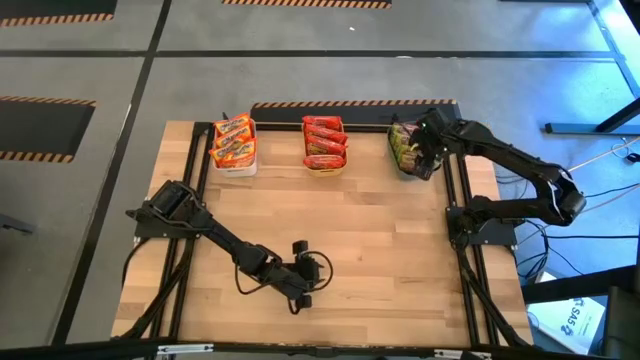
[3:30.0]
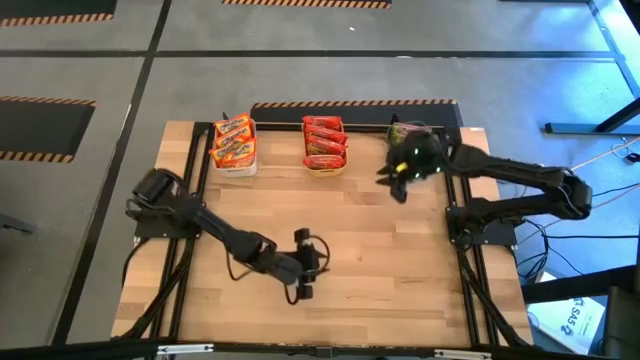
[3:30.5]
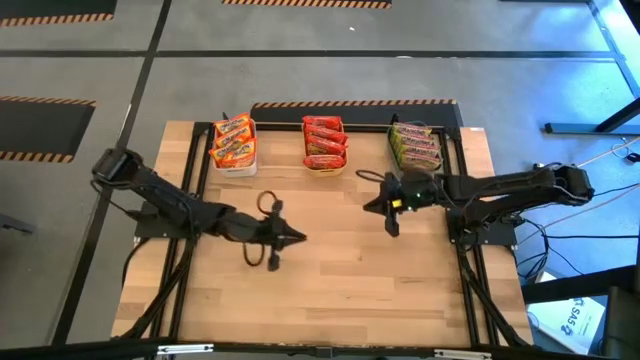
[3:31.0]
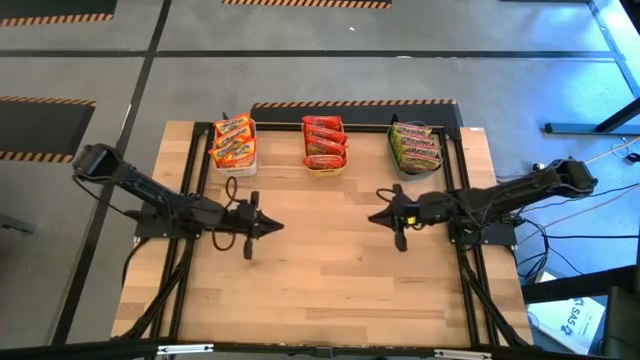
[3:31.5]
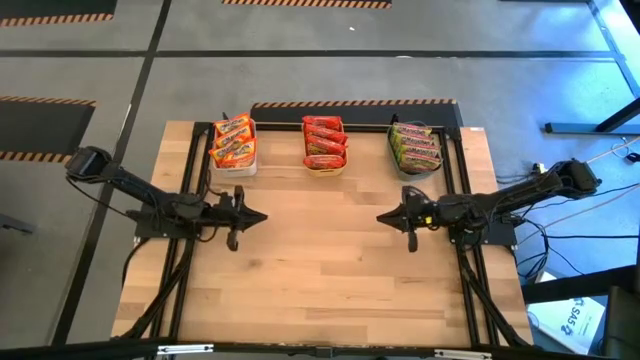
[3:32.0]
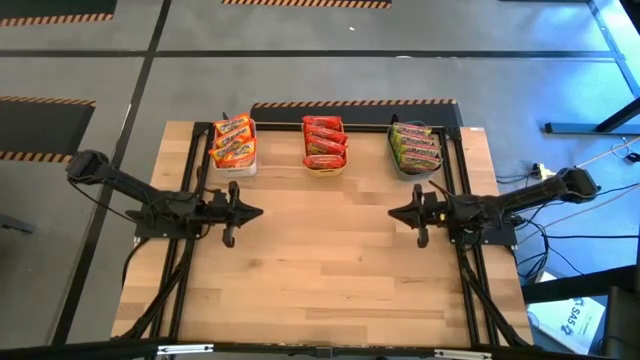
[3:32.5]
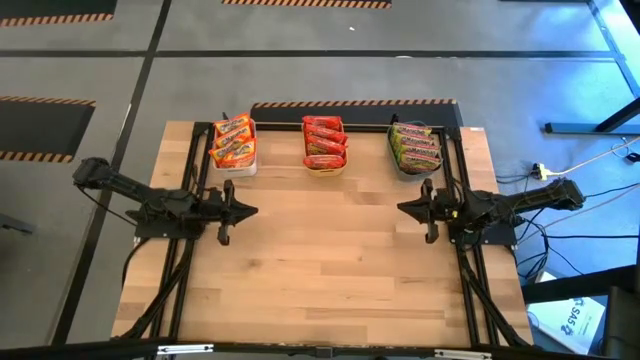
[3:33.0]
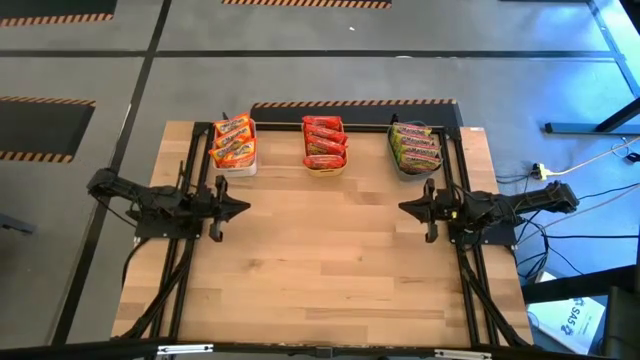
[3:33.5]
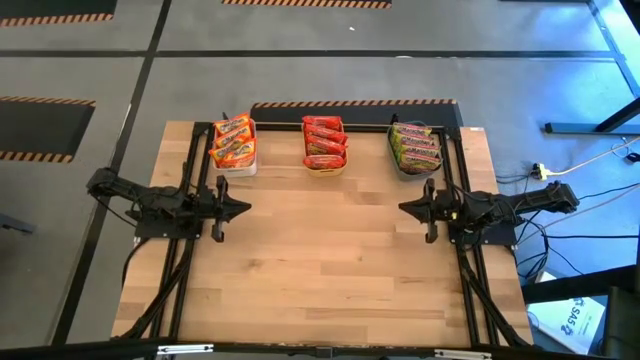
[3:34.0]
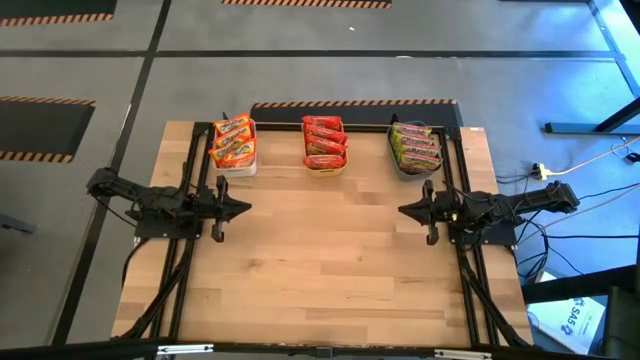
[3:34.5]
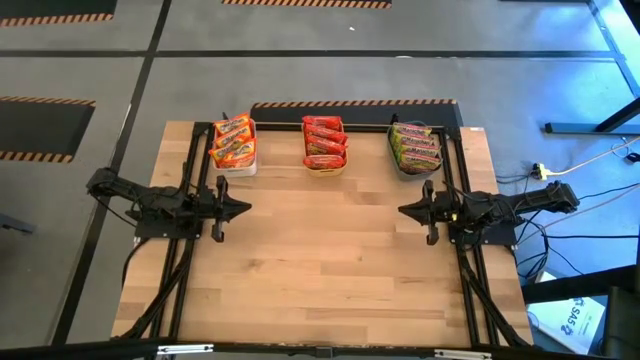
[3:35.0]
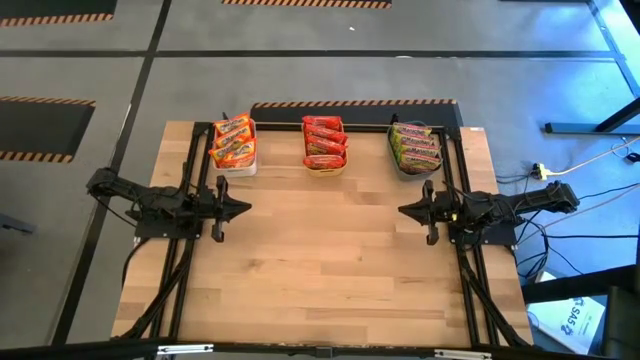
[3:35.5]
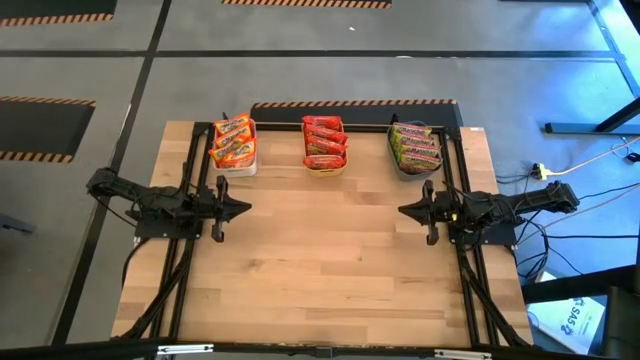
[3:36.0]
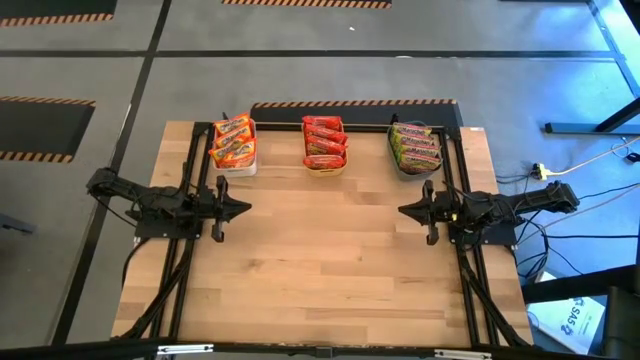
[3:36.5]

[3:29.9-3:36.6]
Task: Sort Maruchan noodles
Return to Home Position

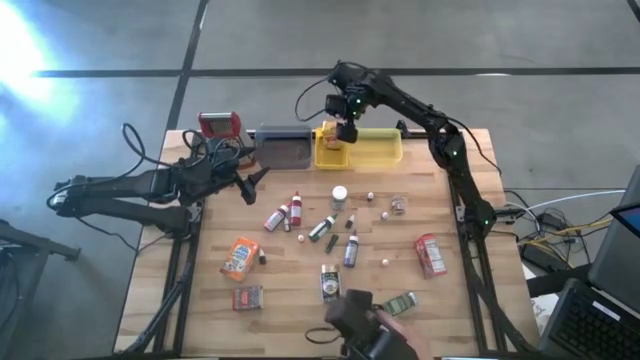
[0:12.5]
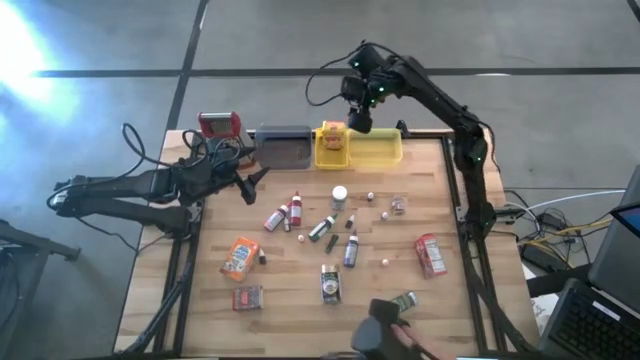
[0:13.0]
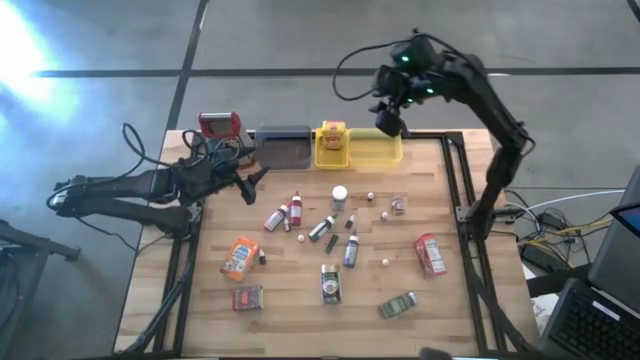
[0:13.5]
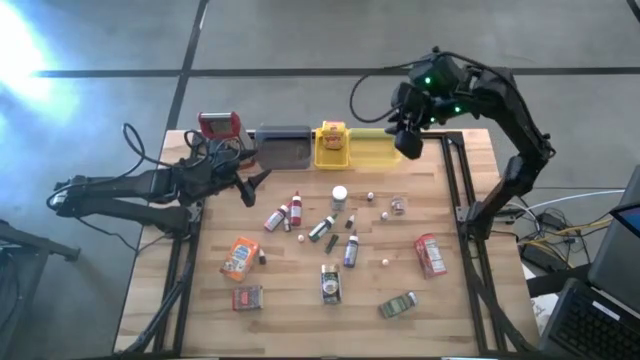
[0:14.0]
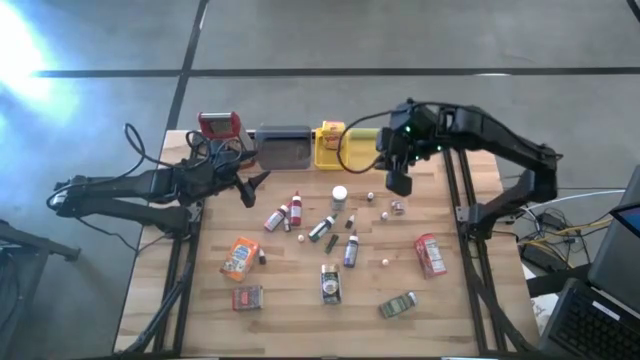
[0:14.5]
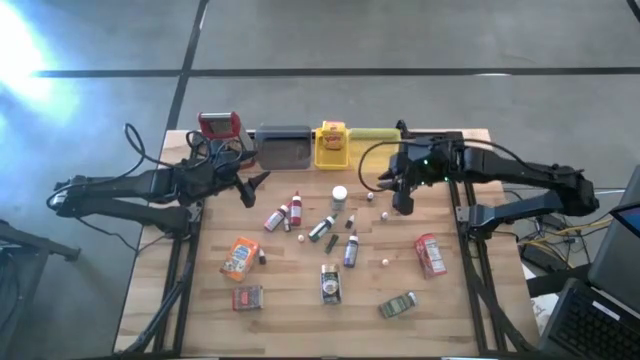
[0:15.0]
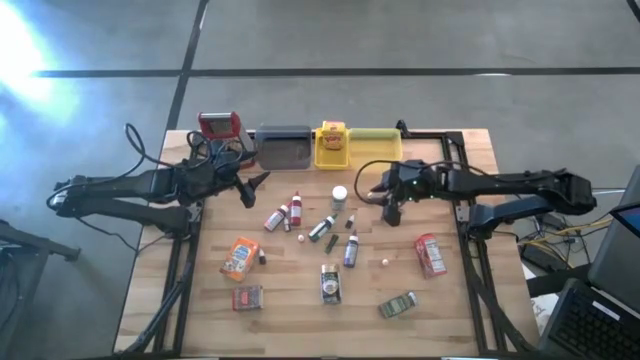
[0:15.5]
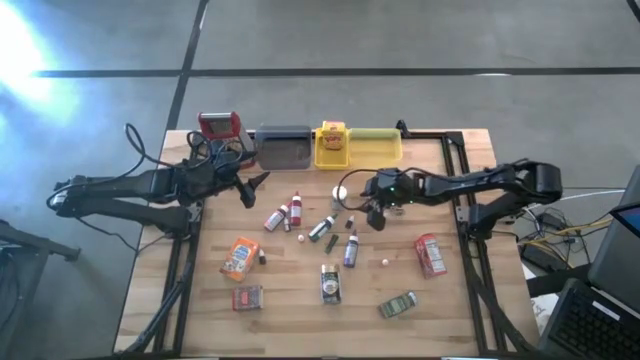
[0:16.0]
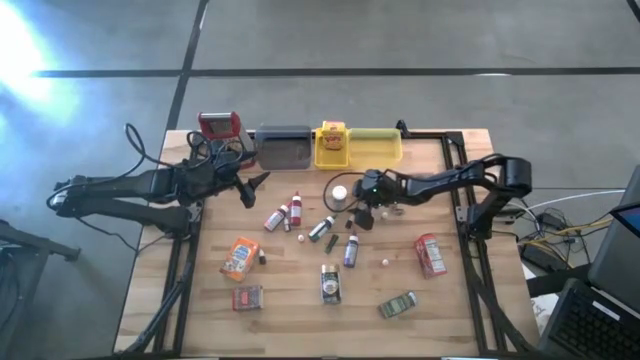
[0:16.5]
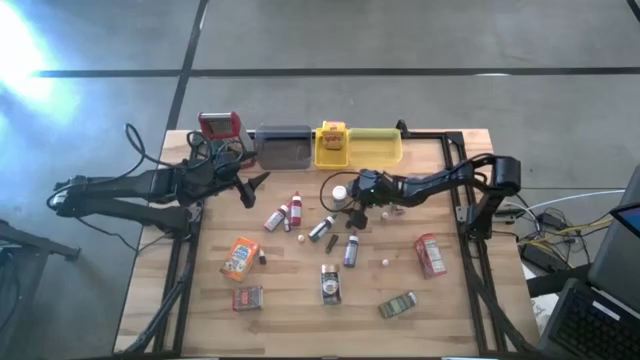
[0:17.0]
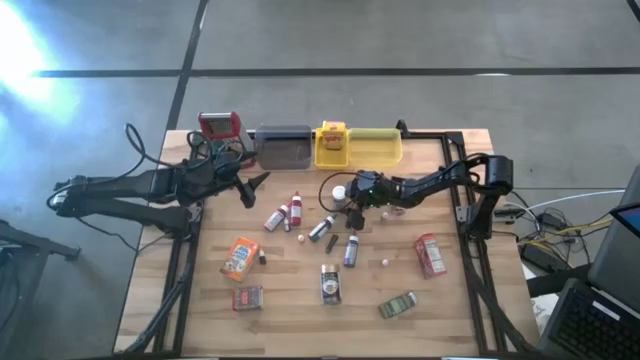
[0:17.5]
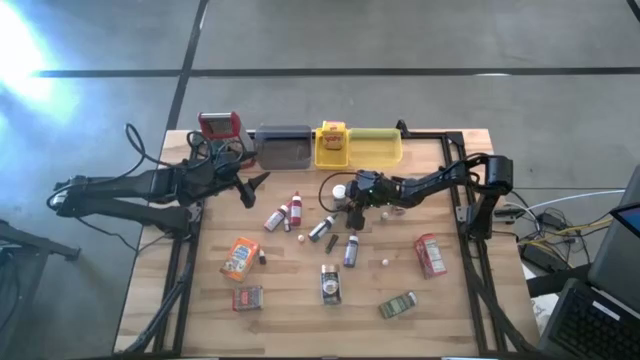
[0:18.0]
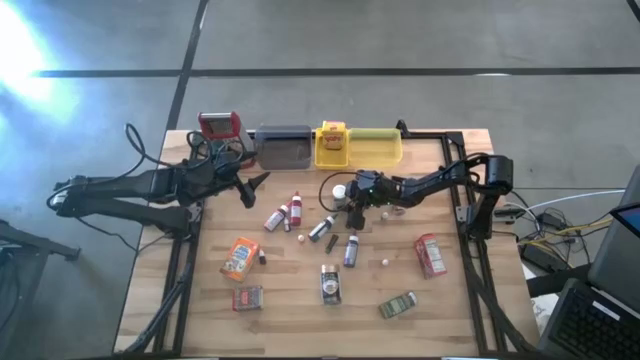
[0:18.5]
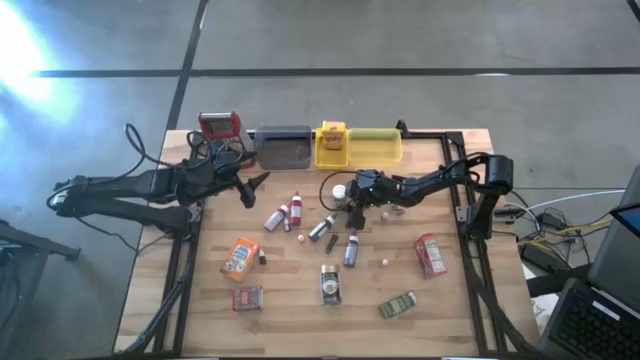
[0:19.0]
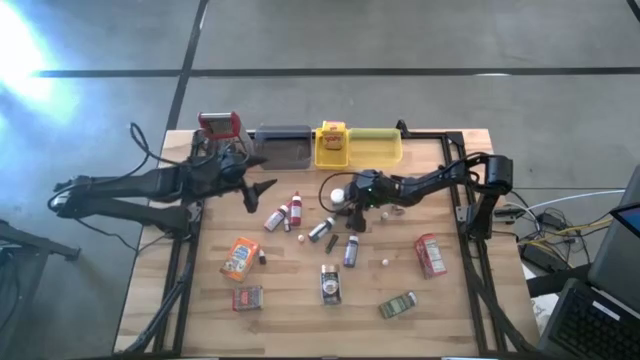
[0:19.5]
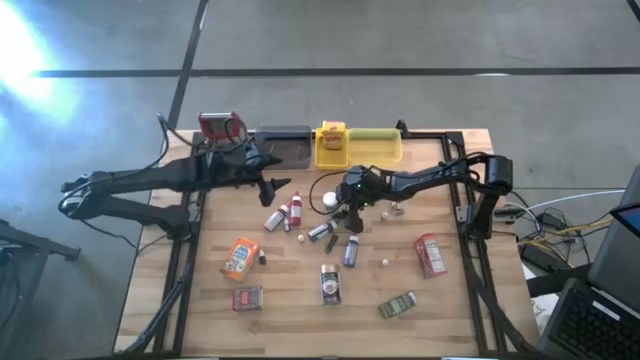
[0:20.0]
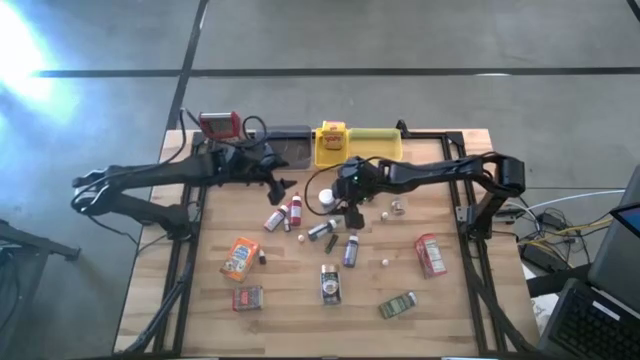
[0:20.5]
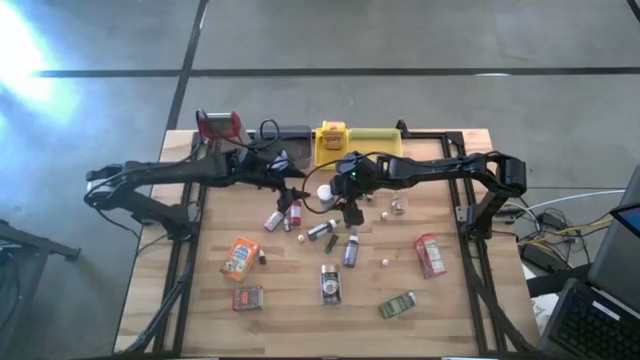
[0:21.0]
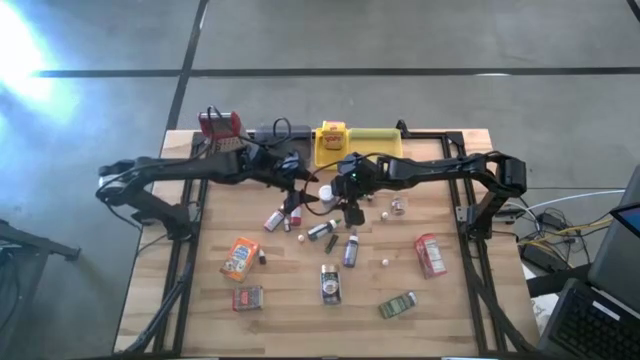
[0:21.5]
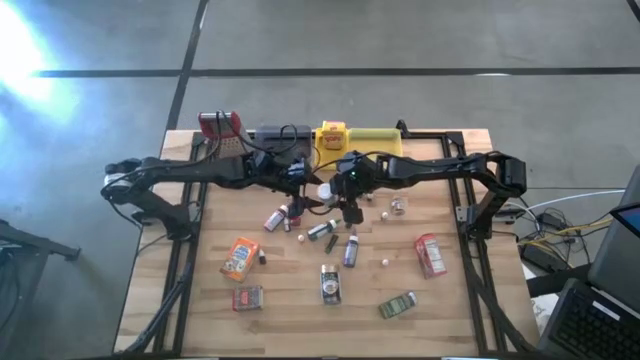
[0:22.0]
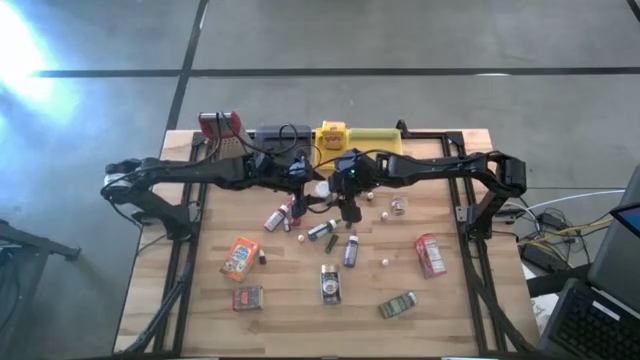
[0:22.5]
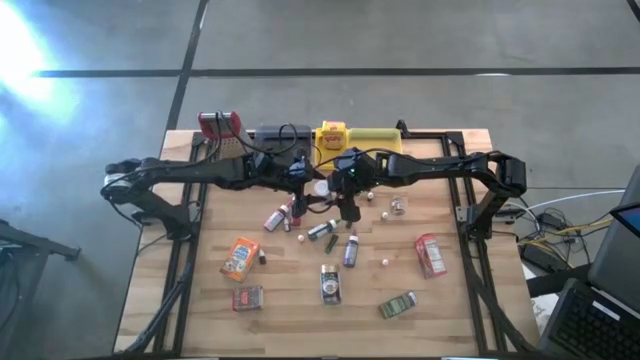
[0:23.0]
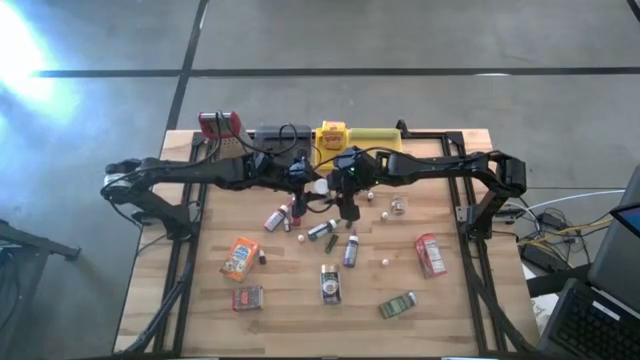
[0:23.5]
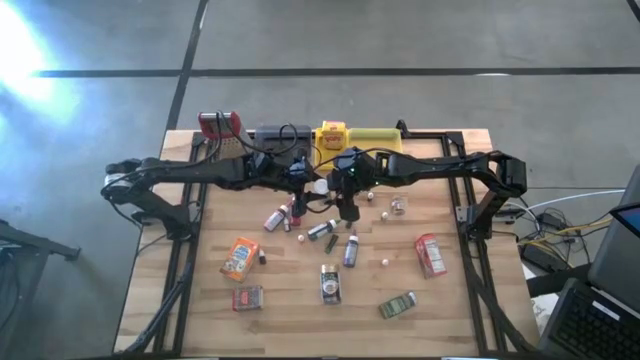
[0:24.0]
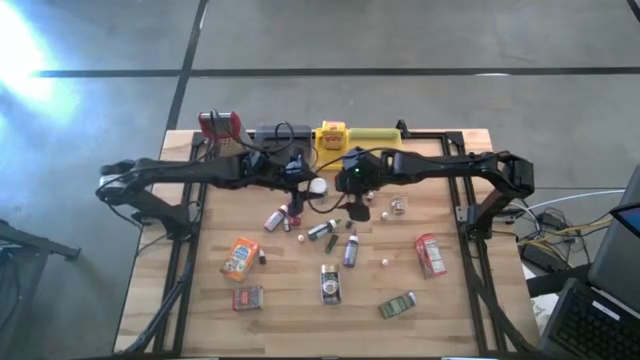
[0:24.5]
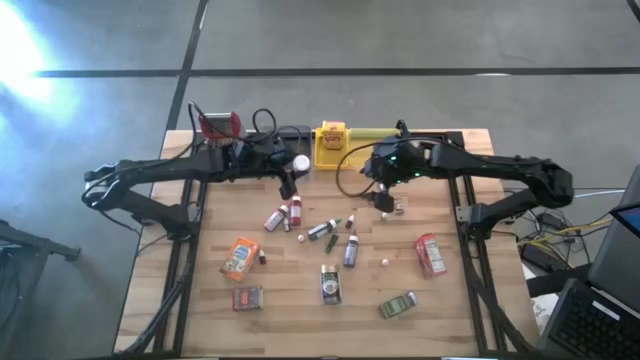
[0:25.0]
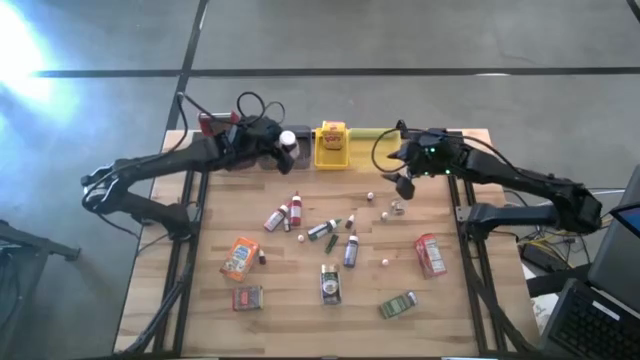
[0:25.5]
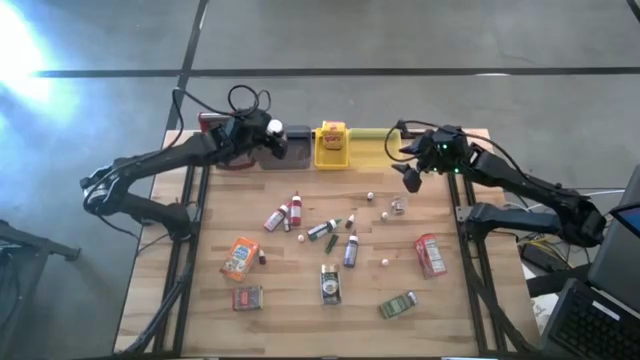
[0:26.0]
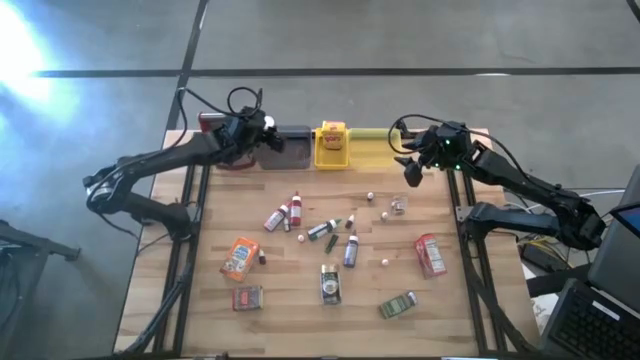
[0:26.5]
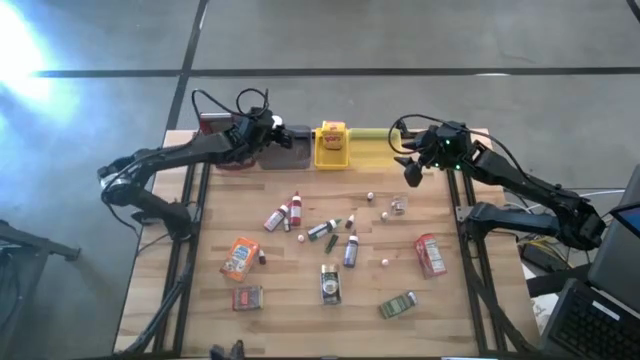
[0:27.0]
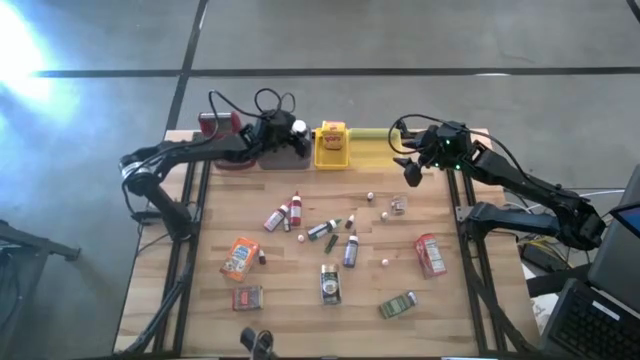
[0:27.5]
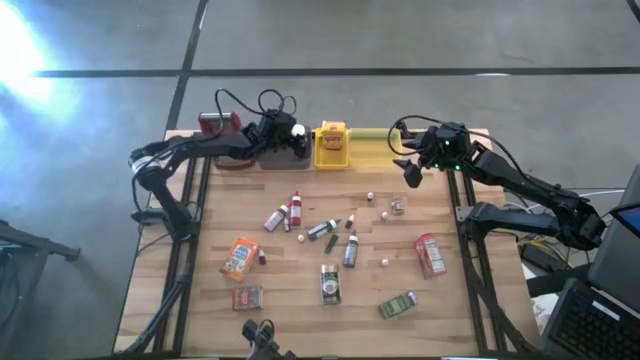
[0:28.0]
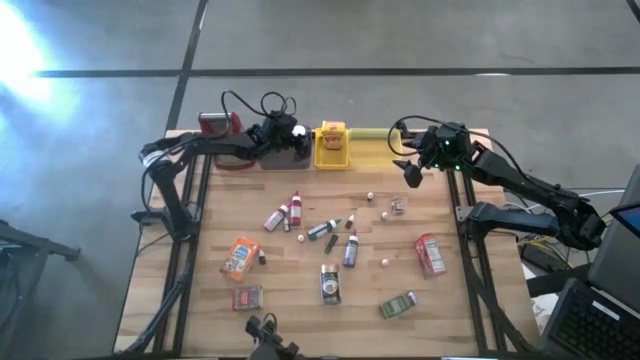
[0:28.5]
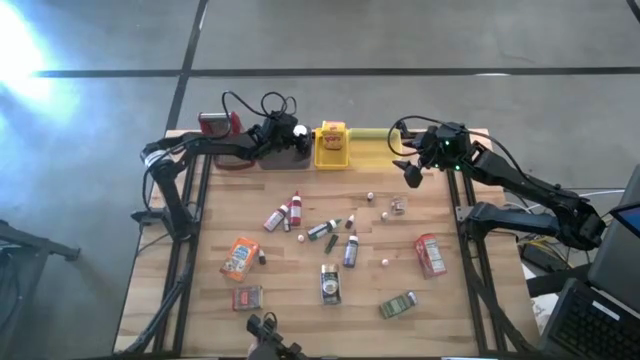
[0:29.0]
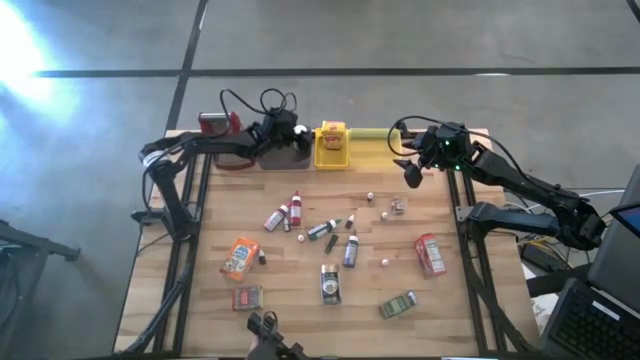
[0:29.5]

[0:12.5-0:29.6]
Task: Pick & Place Kitchen Items
Put the seasoning bottle into the black bin
